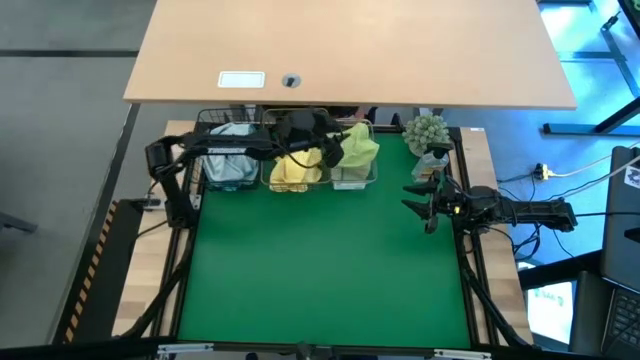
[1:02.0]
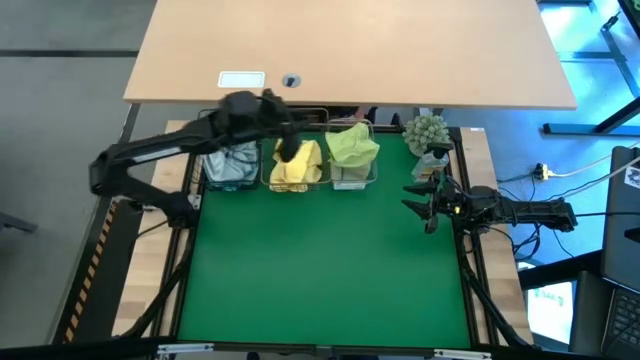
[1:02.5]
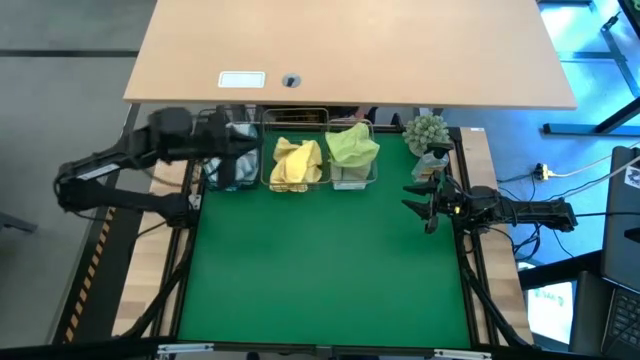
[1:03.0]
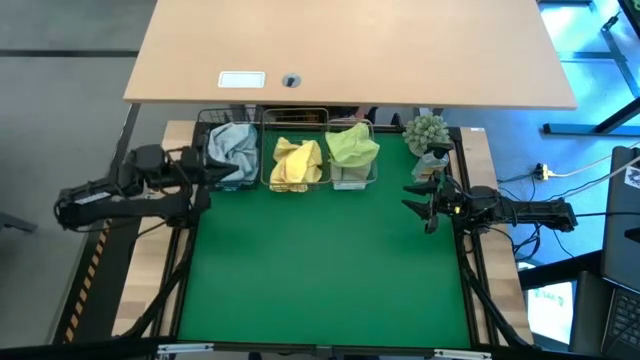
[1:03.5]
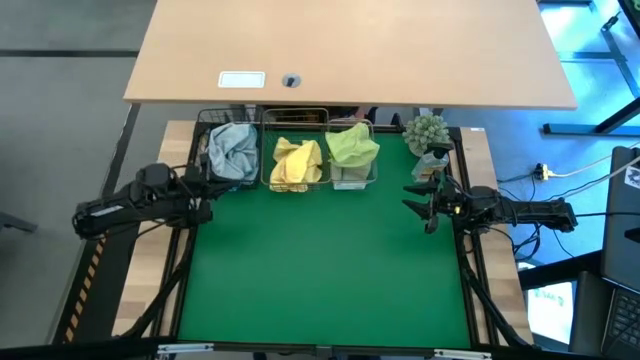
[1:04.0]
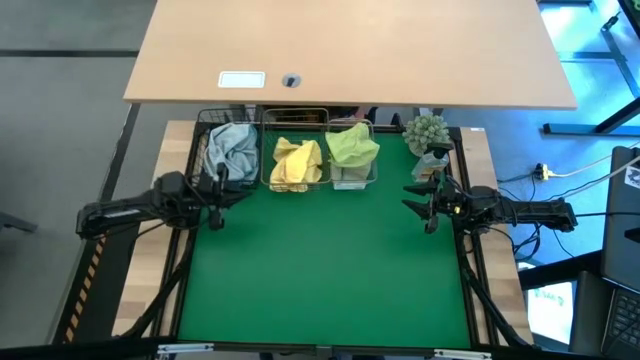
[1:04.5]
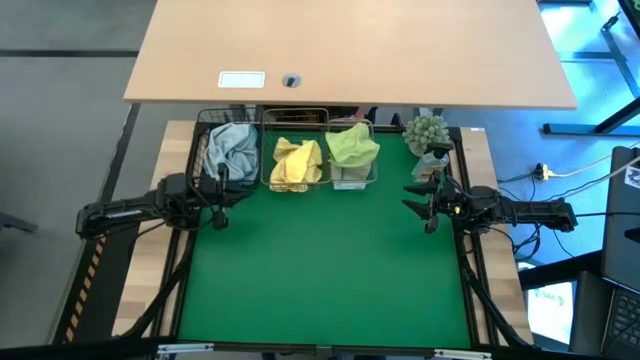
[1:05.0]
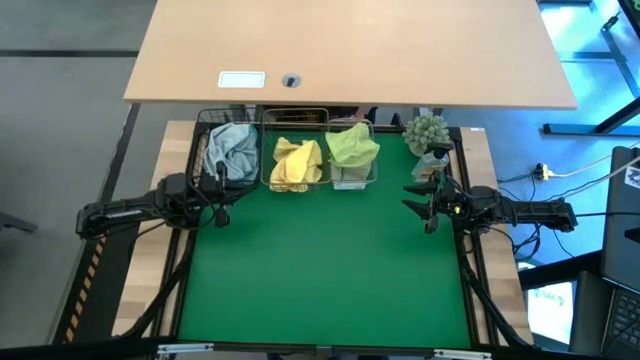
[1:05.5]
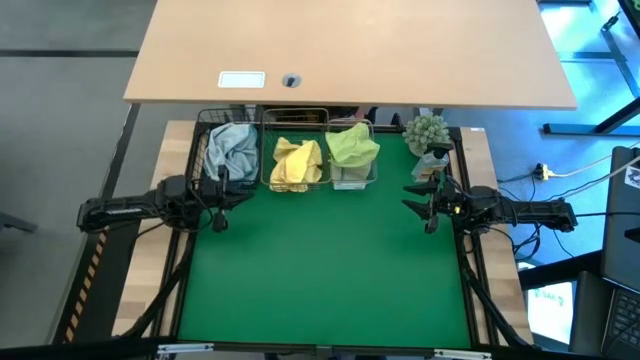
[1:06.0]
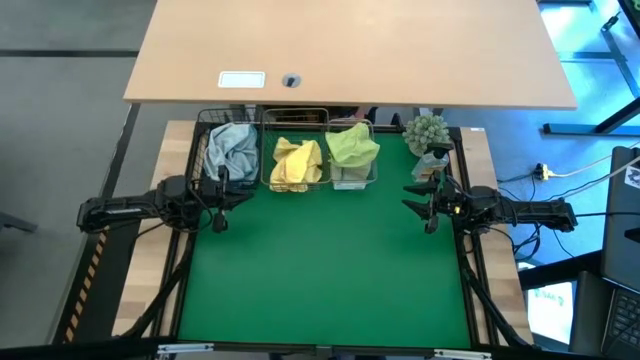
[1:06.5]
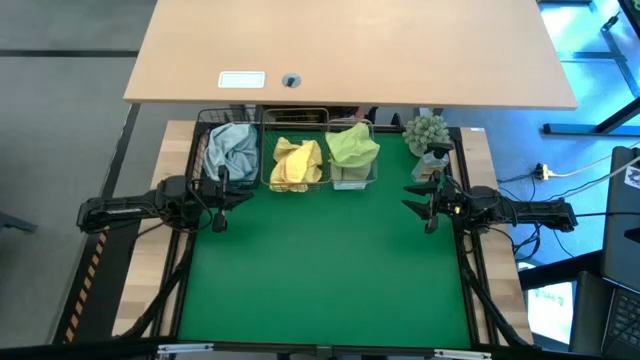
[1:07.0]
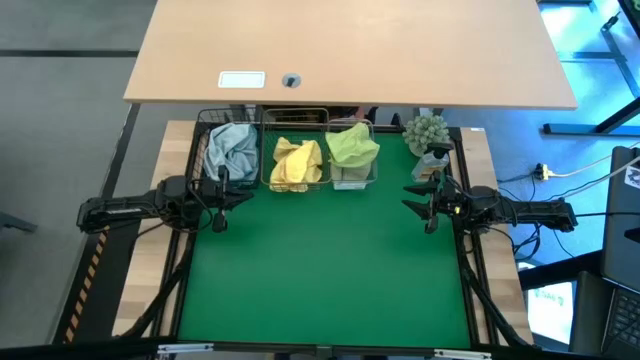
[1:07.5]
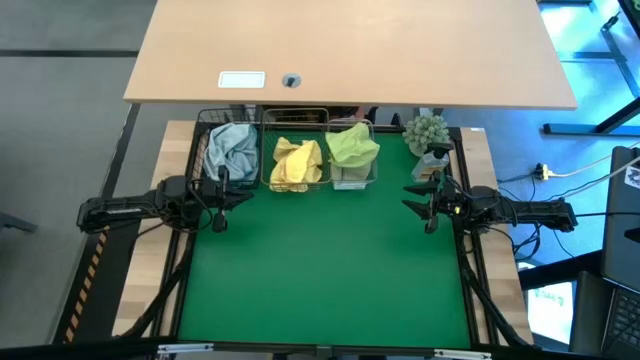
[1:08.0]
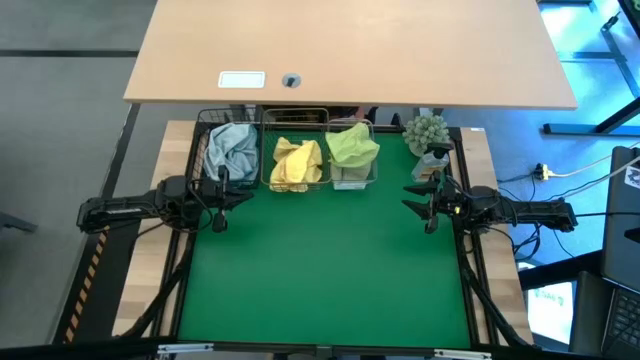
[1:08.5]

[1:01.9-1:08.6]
Task: Sort microfiber towel by color & place in baskets
Return to Home Position

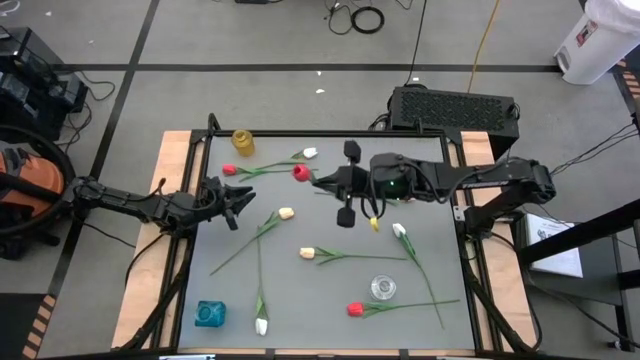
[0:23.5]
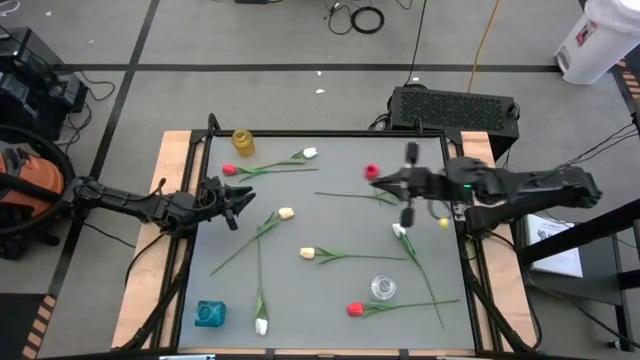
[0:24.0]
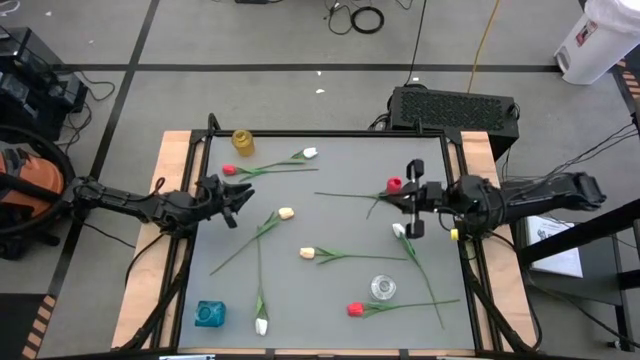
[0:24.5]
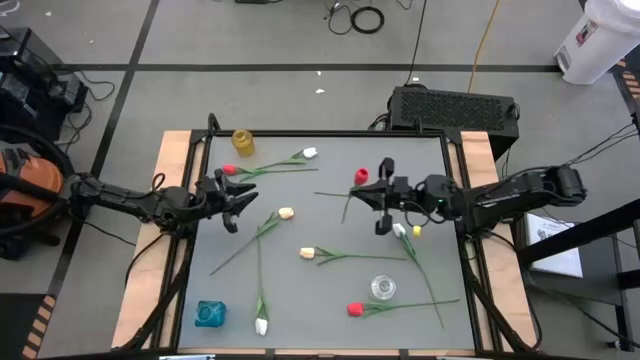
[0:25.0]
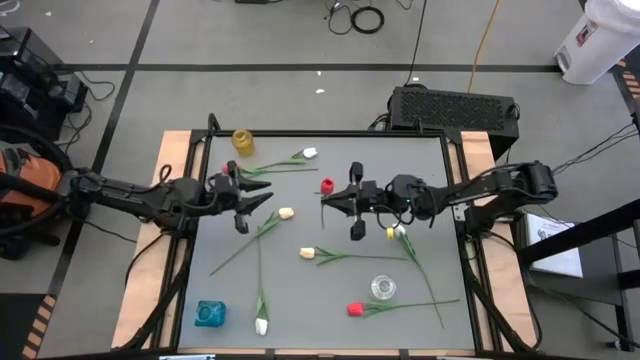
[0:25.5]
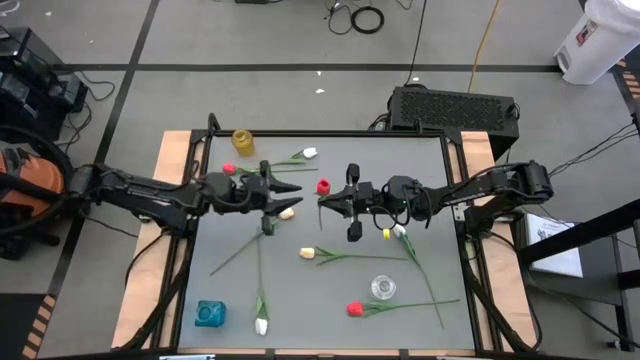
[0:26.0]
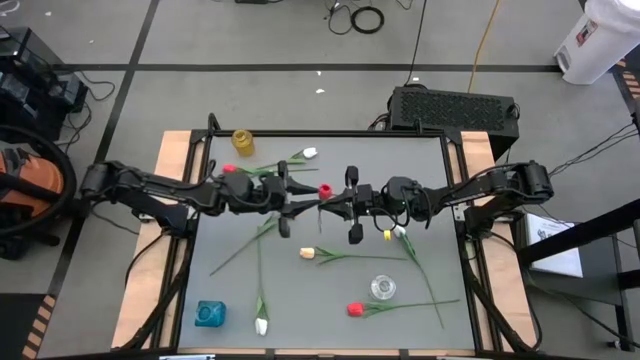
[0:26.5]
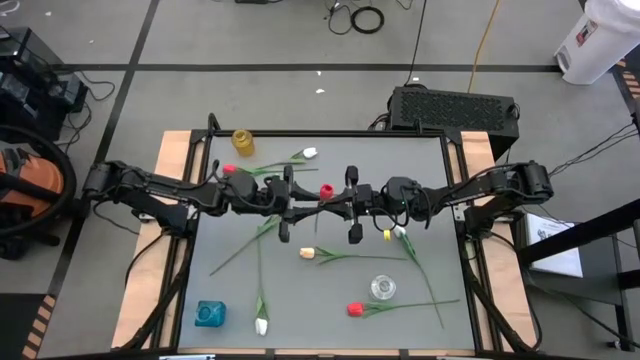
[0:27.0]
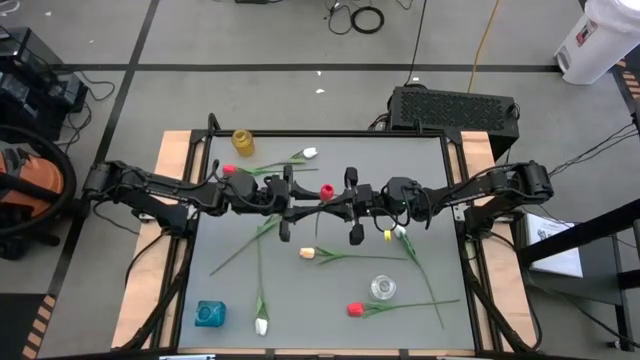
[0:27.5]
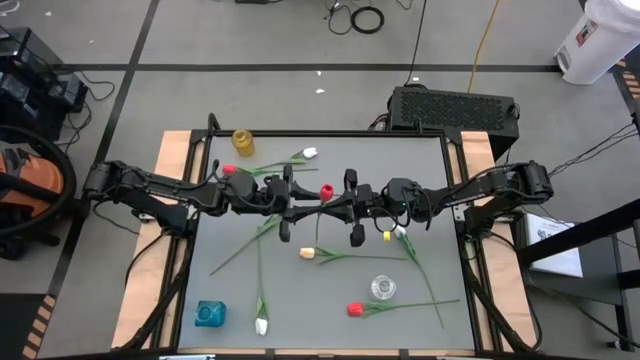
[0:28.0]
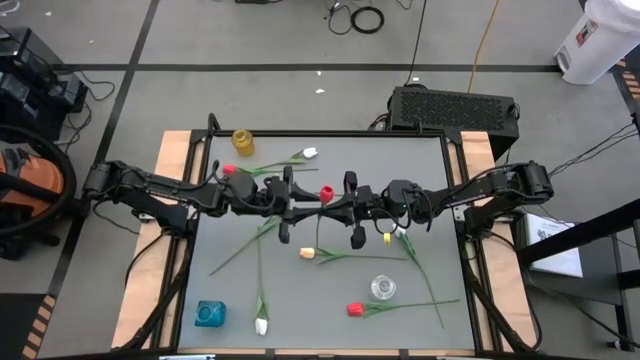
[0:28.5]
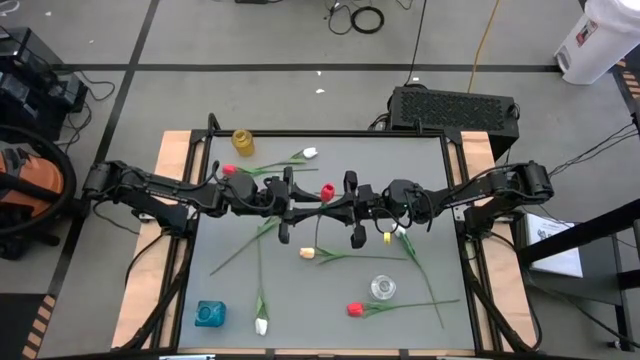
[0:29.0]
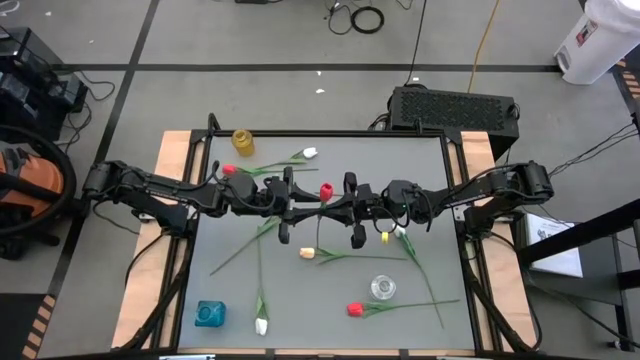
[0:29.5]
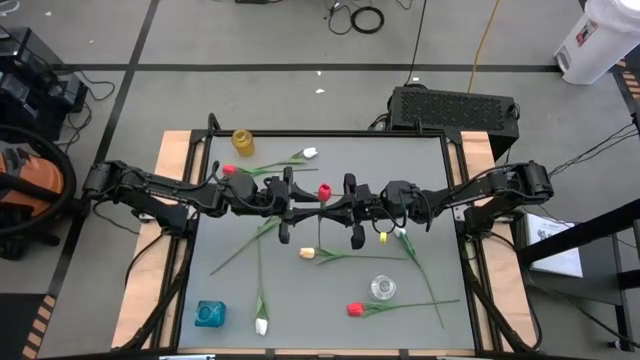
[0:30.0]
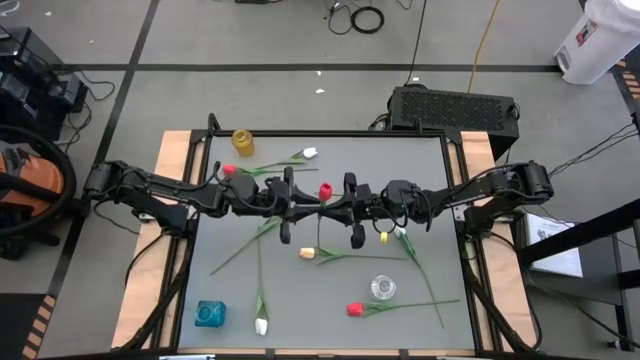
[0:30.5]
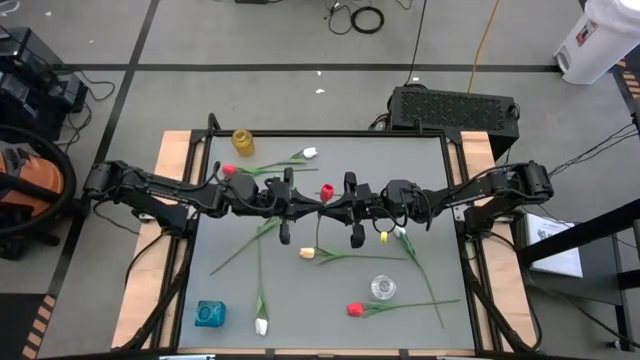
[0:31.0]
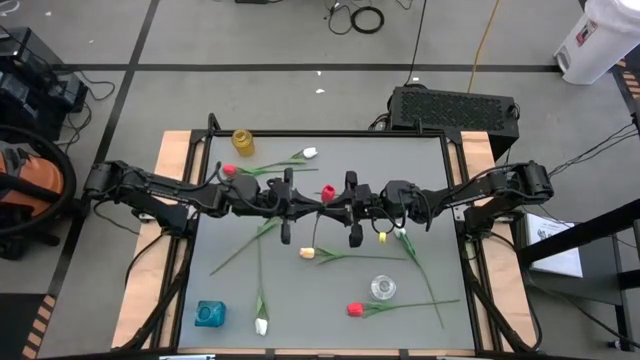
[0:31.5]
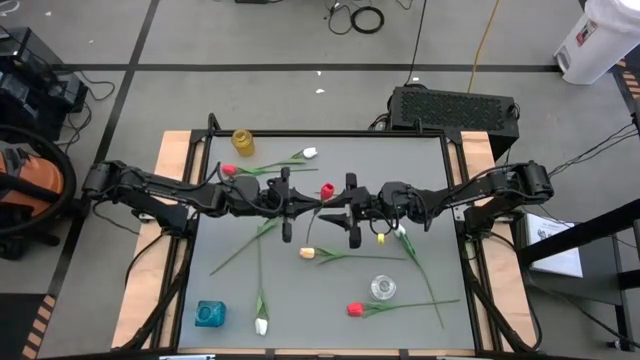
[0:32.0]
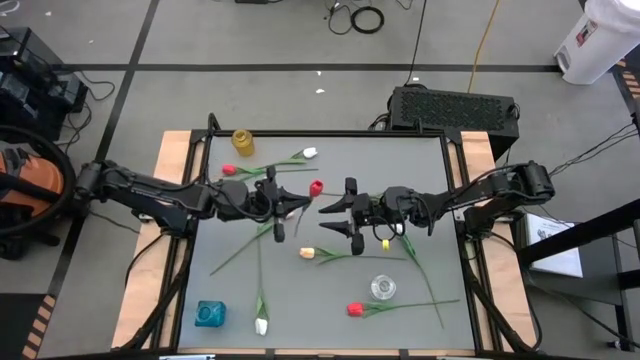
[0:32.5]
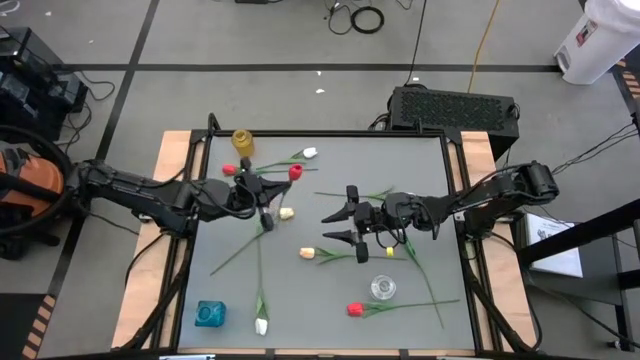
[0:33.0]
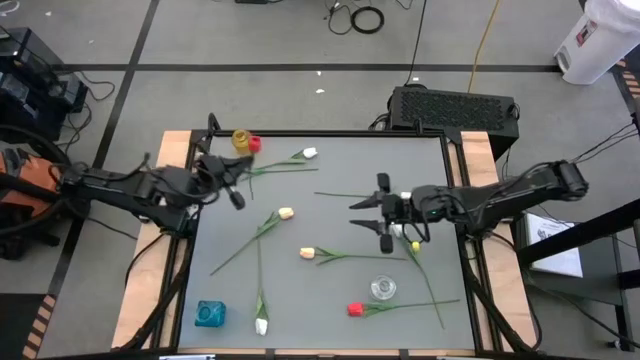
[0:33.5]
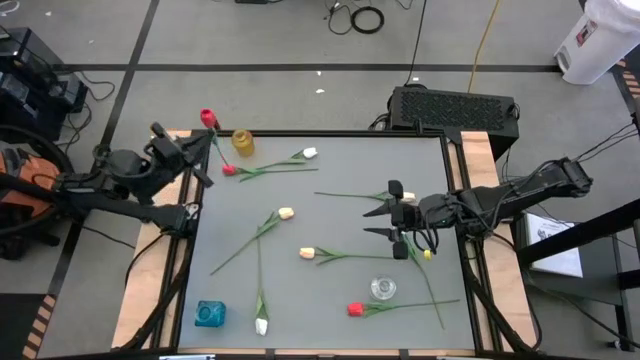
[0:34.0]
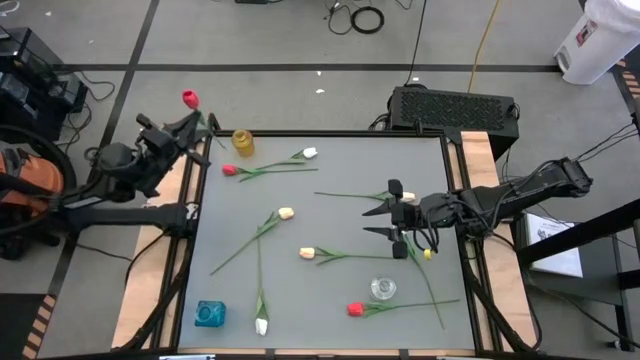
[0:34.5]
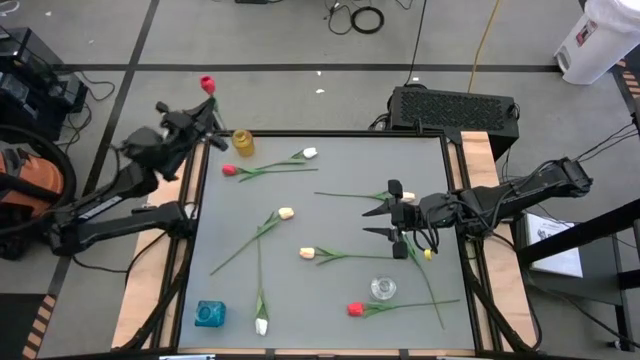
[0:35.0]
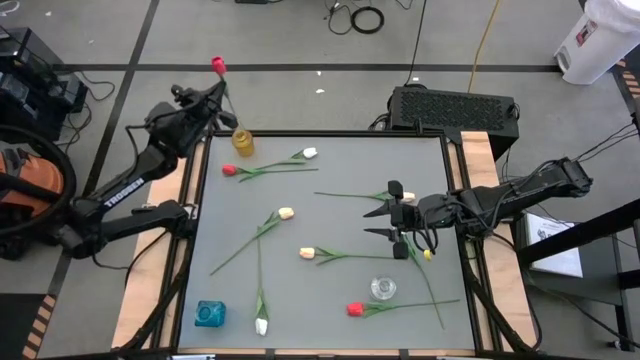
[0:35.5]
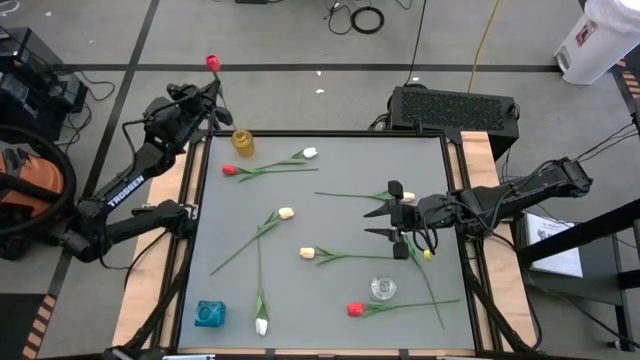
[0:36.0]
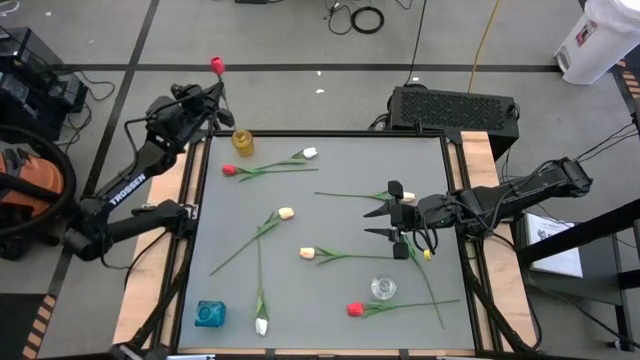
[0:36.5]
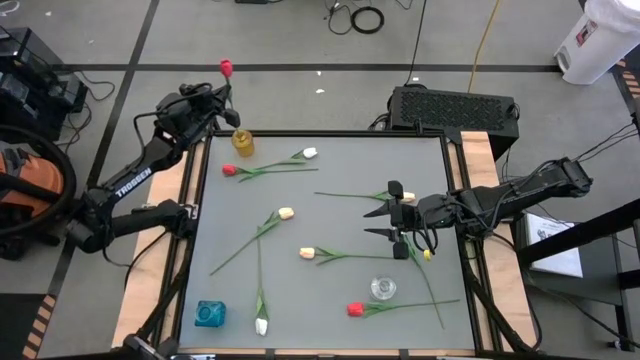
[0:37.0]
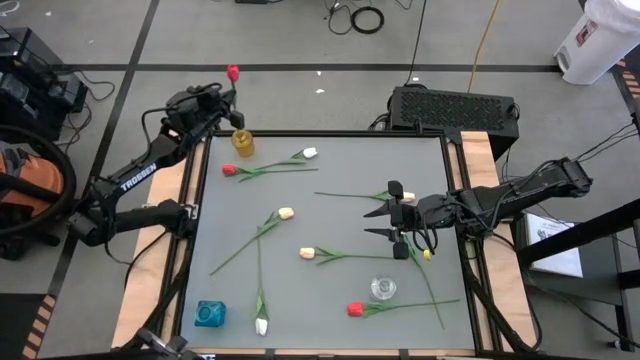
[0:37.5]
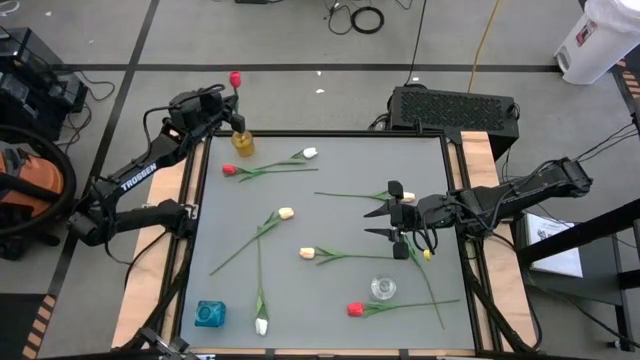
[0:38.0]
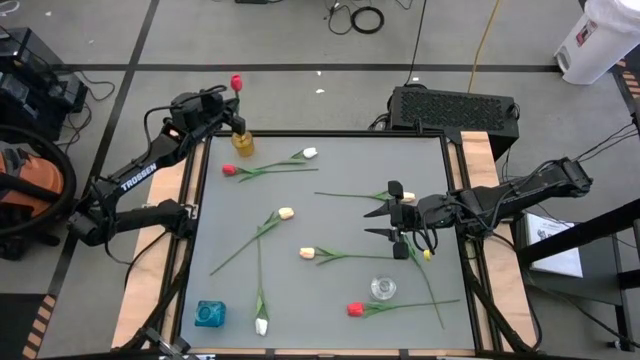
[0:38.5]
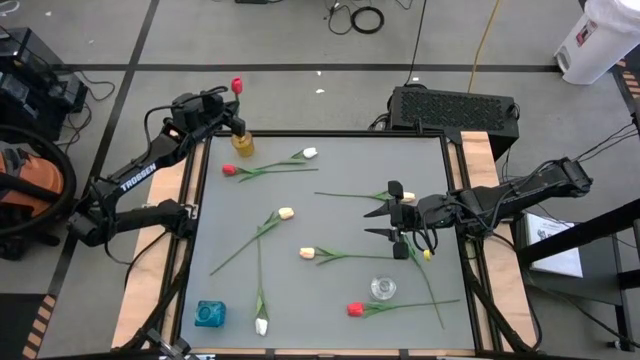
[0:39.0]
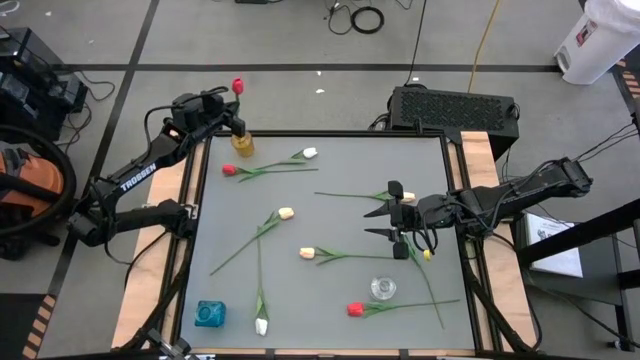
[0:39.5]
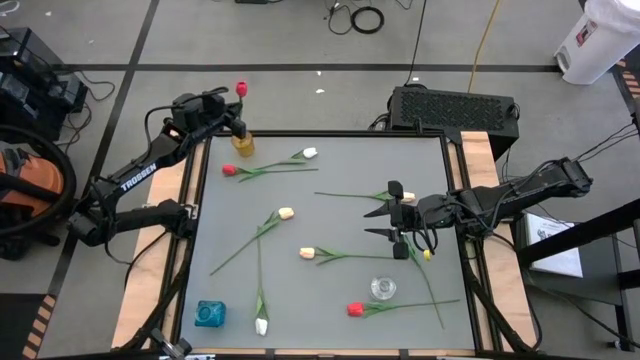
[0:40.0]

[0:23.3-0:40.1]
Task: Sort flowers into vase by color
Put the top right red tulip into the yellow vase
